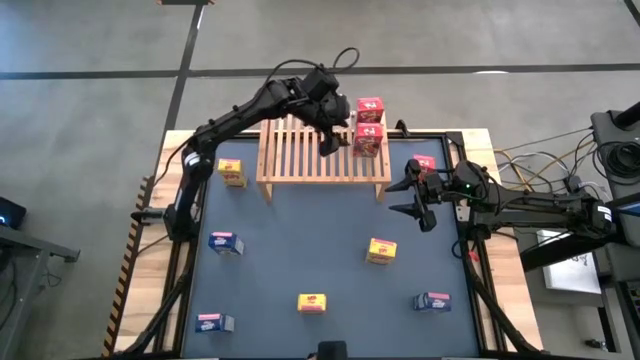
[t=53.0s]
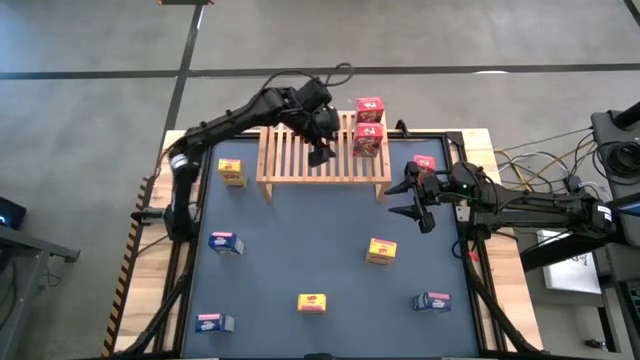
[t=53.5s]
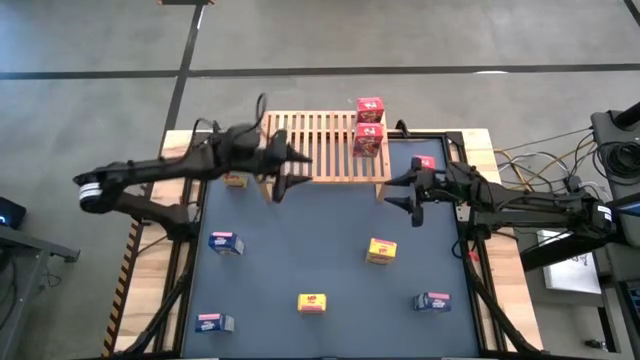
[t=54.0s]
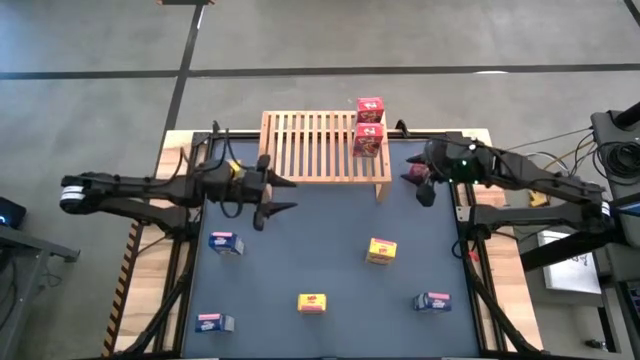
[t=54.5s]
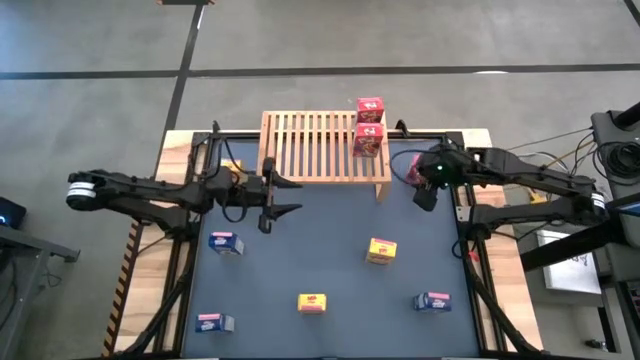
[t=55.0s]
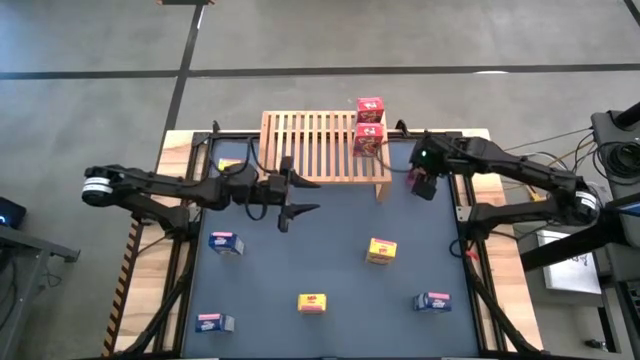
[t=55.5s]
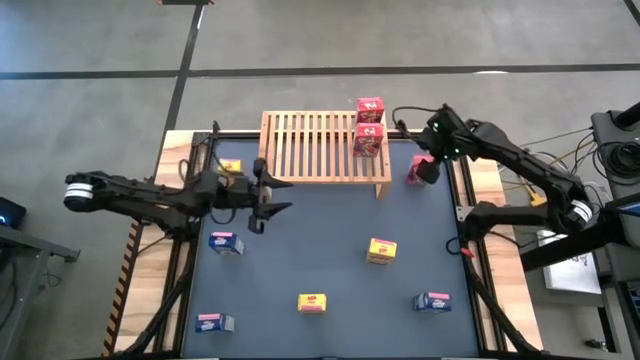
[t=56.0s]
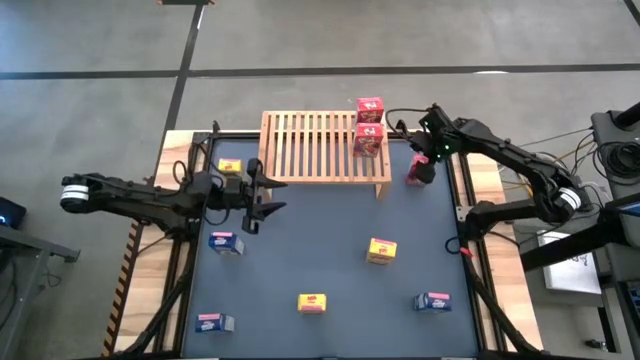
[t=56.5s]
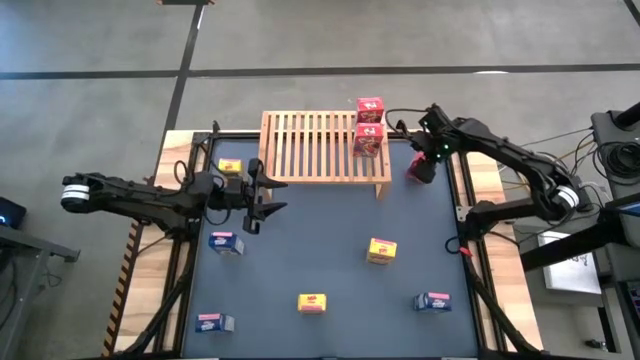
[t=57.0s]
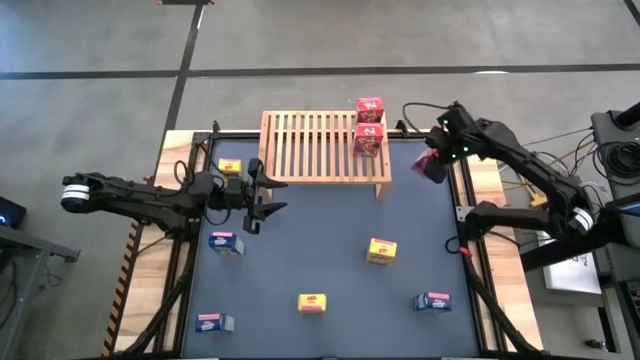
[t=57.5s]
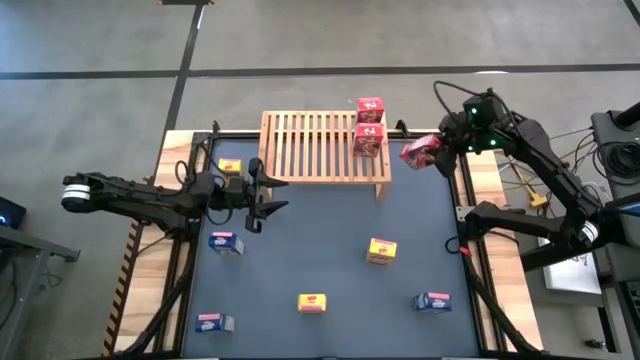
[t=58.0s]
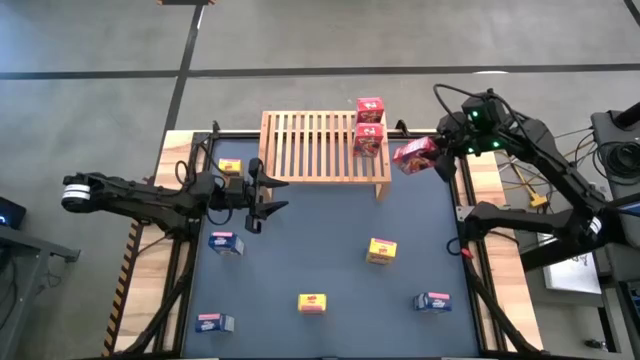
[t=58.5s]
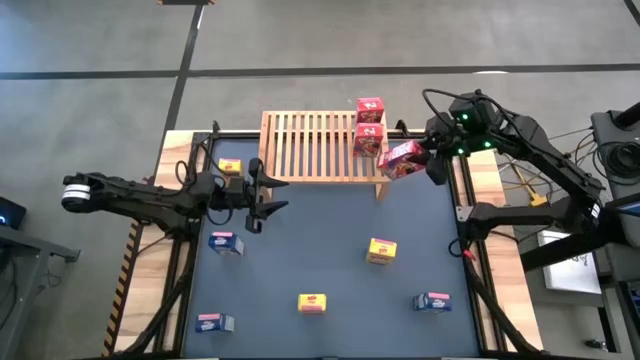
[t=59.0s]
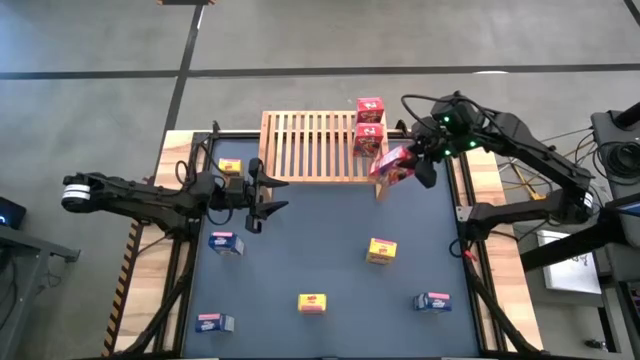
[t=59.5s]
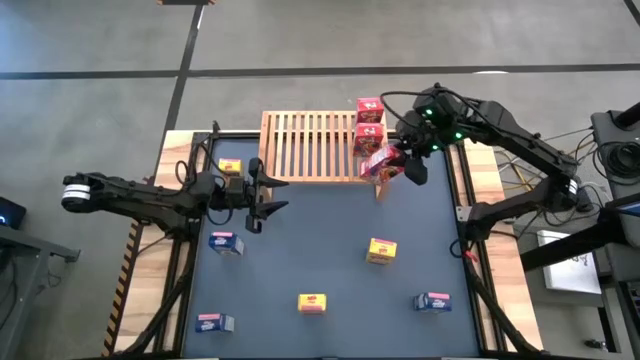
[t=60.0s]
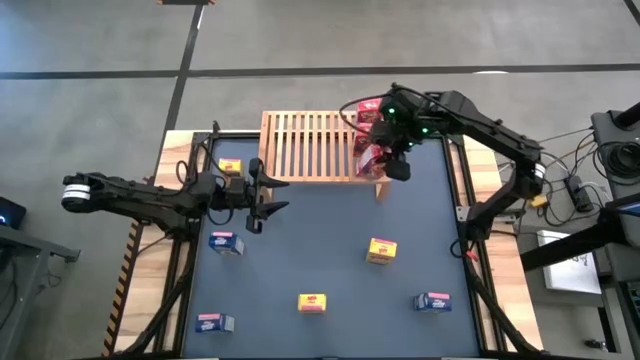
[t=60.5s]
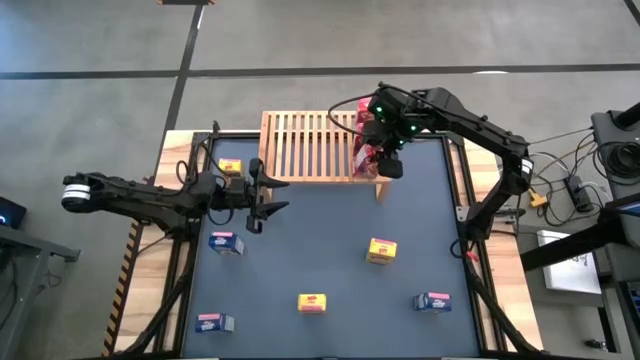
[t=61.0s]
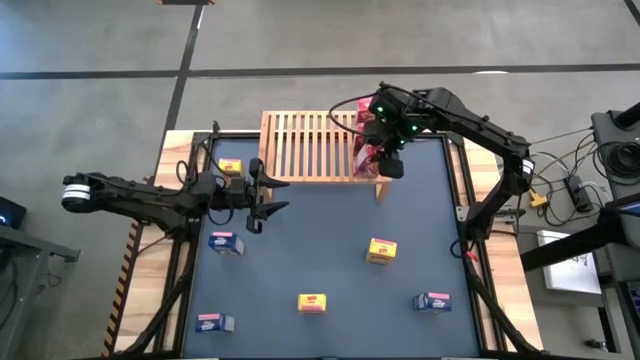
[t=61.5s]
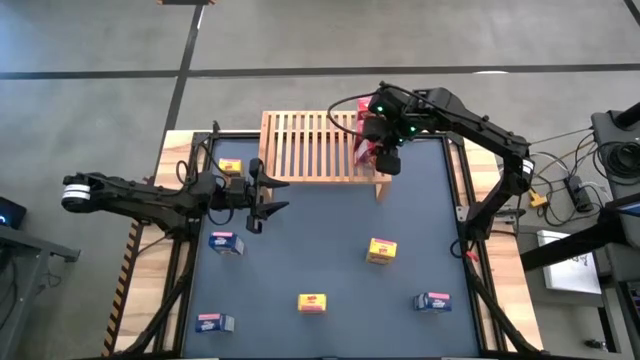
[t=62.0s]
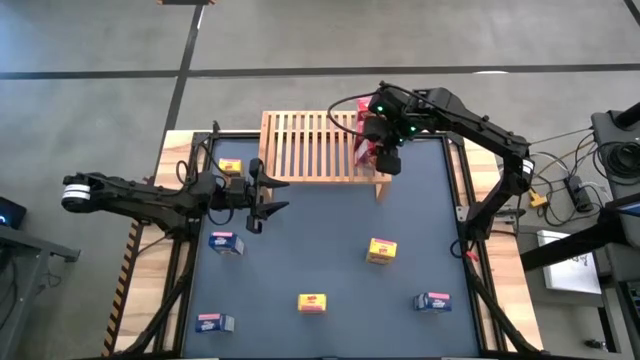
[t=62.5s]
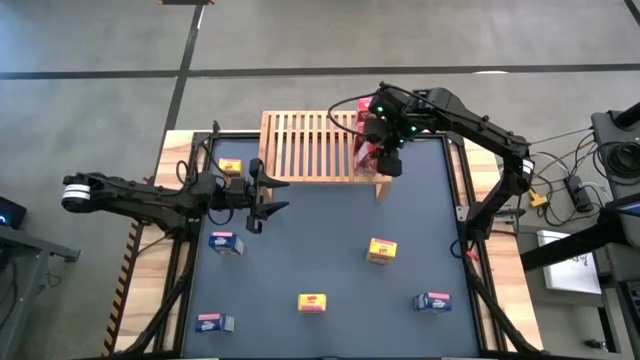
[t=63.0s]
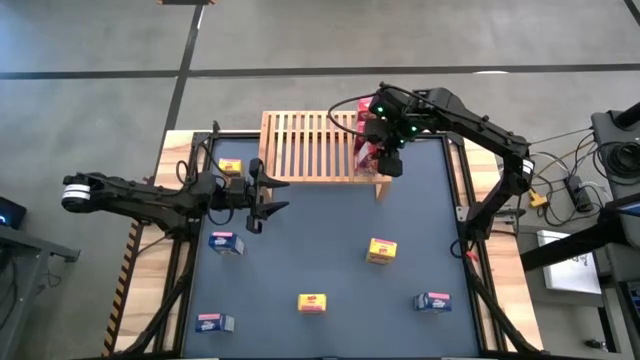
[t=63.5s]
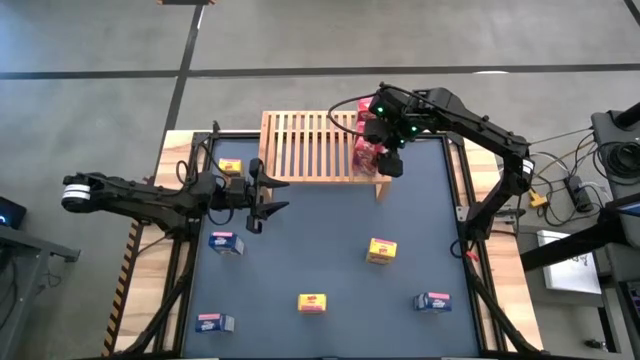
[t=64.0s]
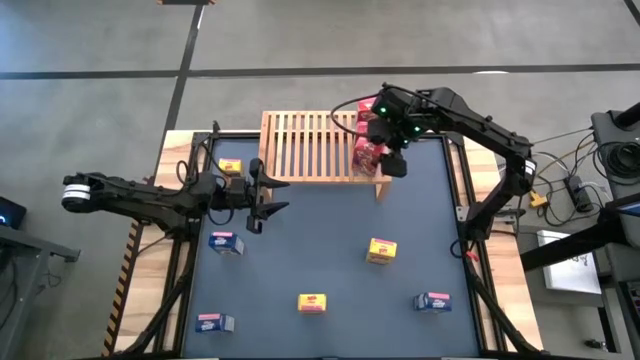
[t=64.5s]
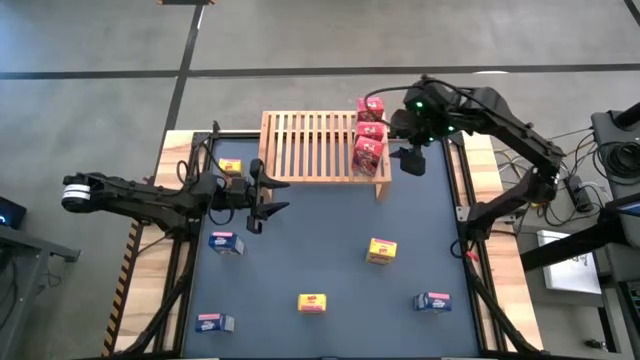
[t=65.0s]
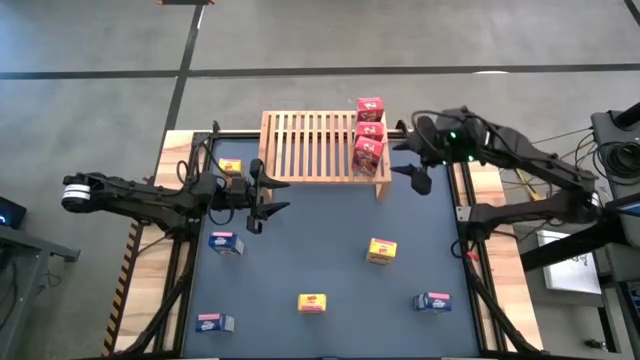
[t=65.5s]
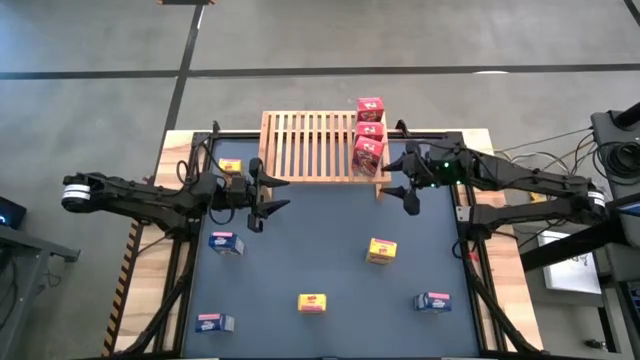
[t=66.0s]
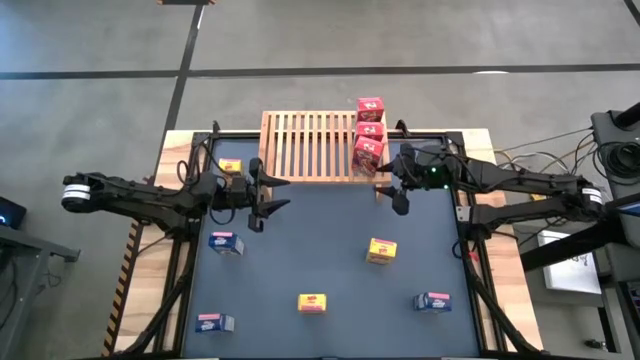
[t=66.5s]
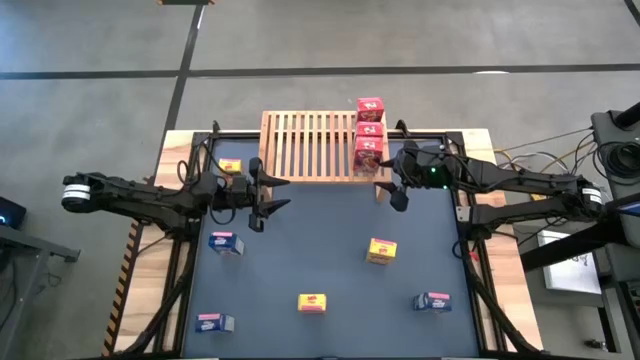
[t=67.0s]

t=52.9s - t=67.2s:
Task: Stack cereal on shelf
Put the red cereal box on the shelf aligned with the red cereal boxes

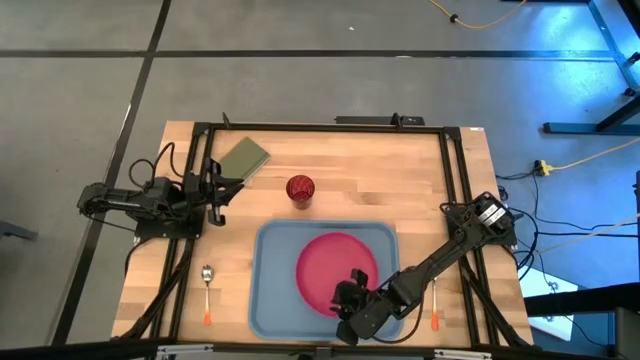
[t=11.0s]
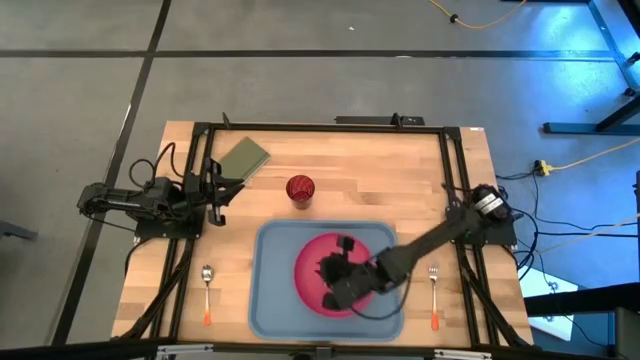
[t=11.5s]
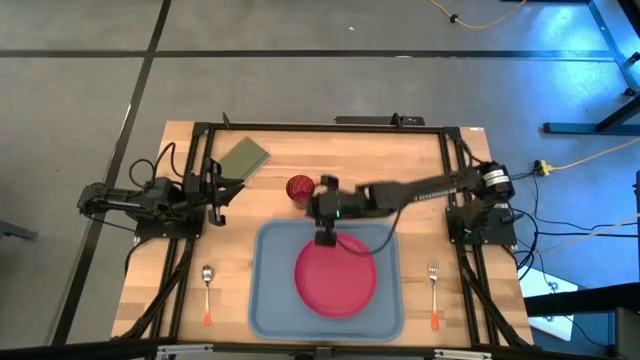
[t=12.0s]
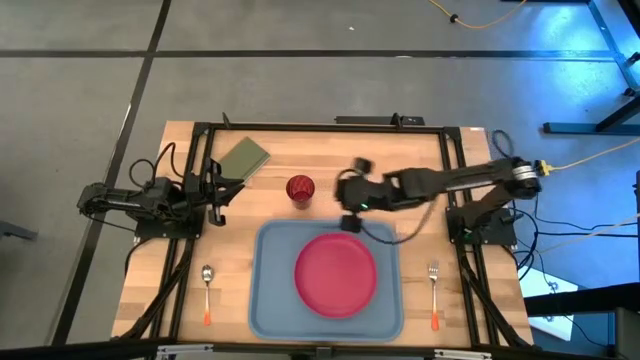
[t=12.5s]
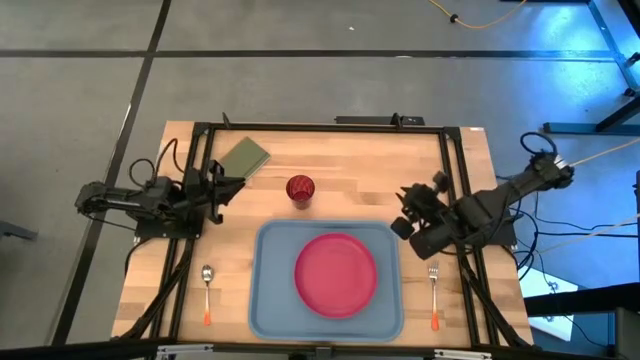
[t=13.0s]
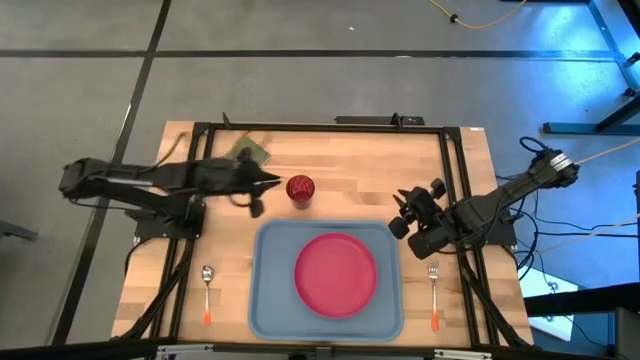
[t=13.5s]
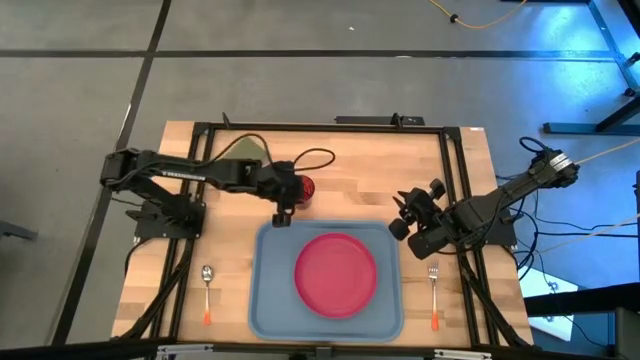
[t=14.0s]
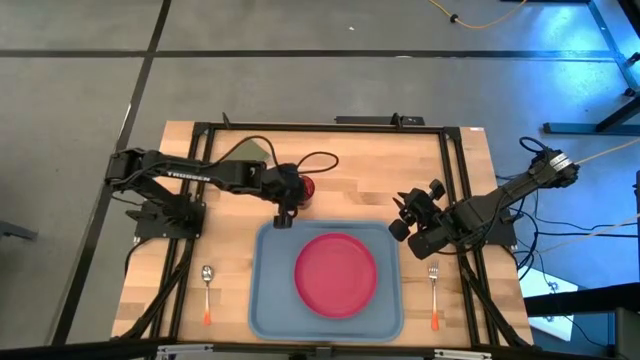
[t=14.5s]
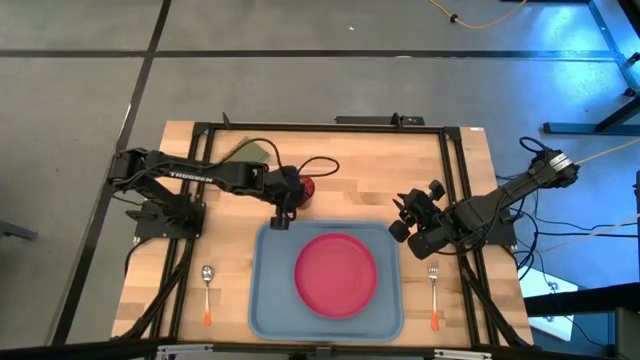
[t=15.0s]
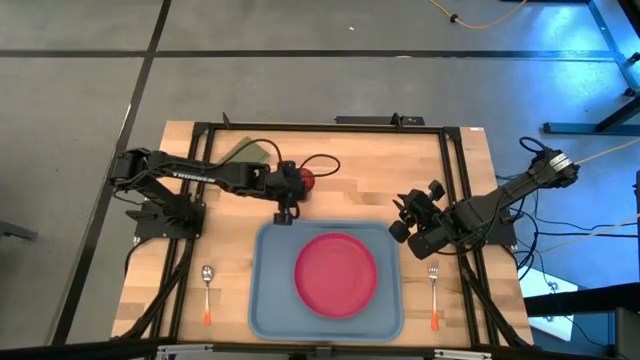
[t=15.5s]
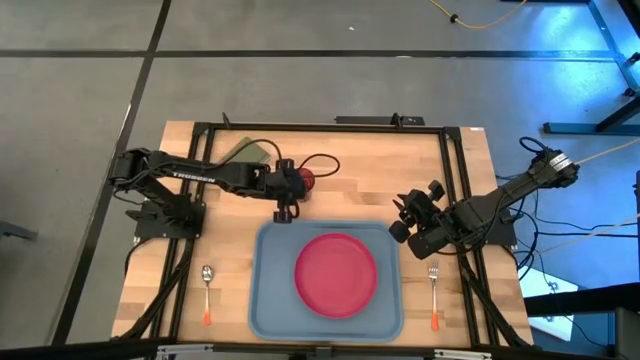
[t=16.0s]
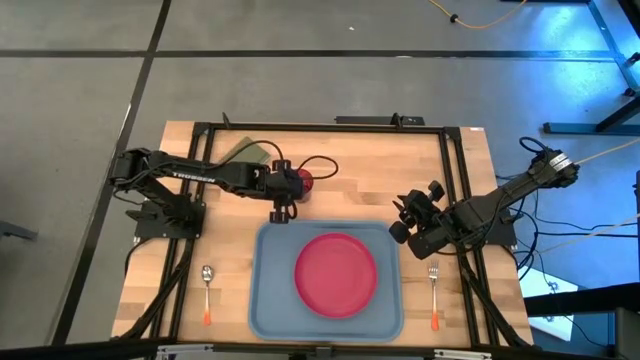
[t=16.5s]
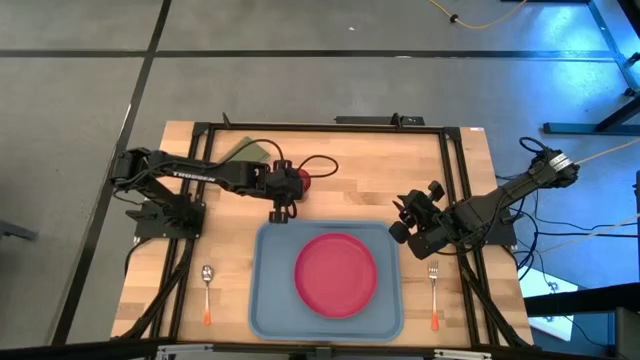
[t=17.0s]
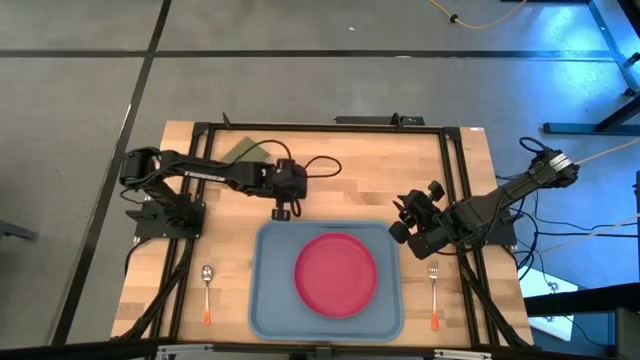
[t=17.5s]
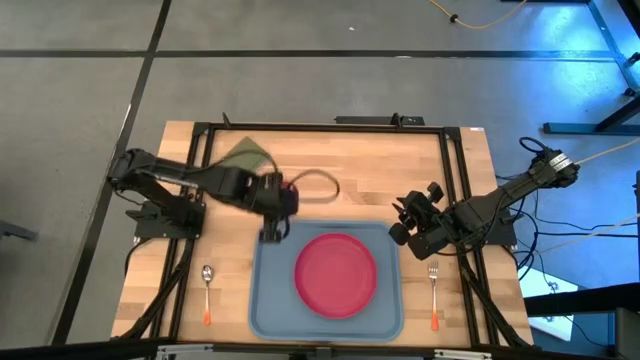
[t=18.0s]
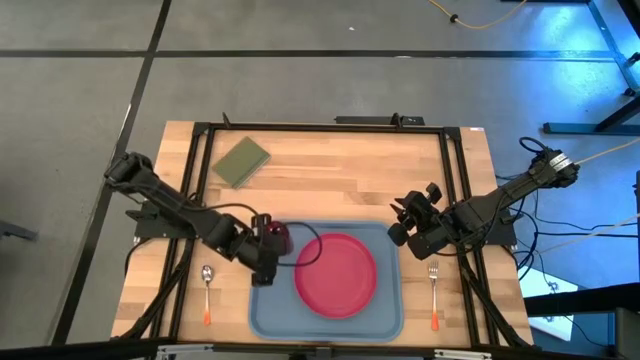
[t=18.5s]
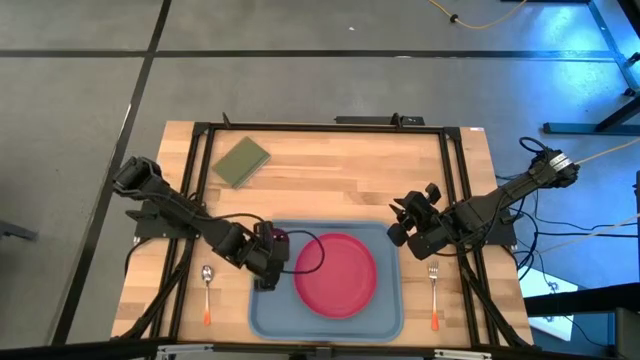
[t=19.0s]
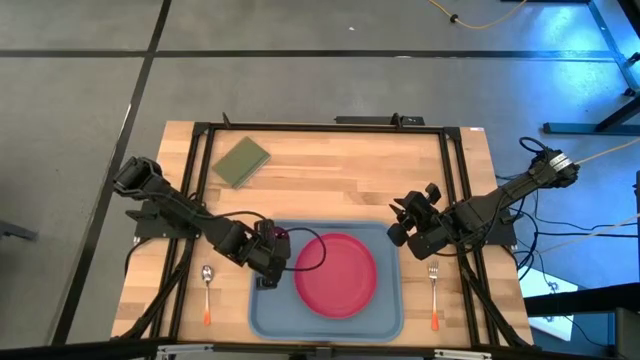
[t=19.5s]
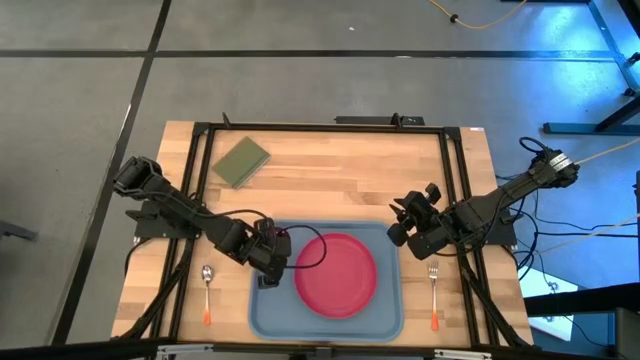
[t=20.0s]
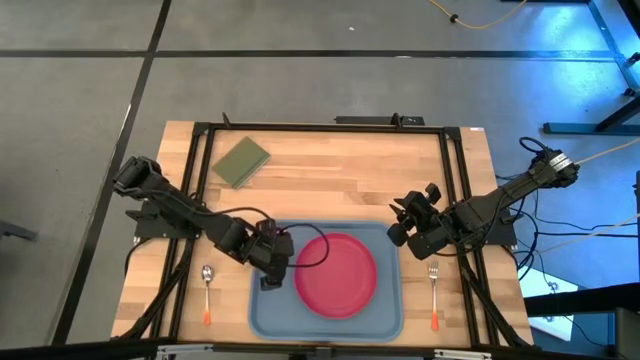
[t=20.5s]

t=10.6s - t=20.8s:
Task: Pick and place plate/cup/fork/spoon on tray
Put the red cup on the blue serving tray to the top left of the red plate
